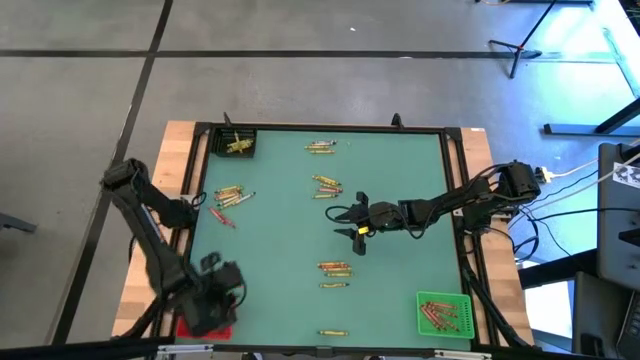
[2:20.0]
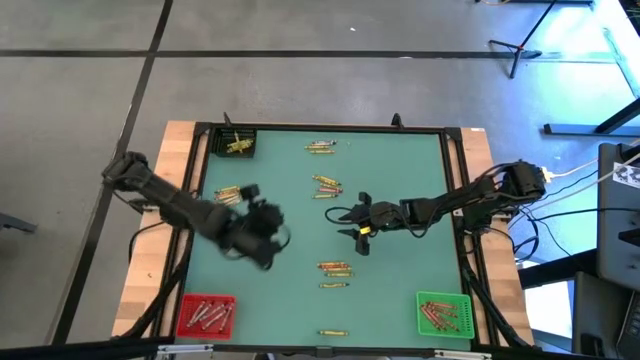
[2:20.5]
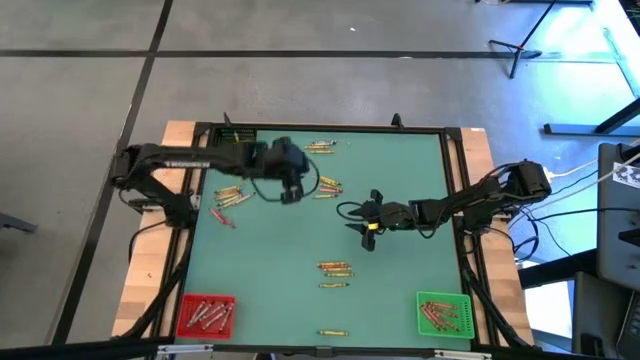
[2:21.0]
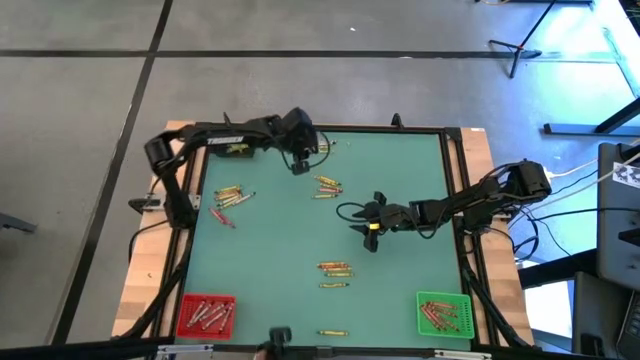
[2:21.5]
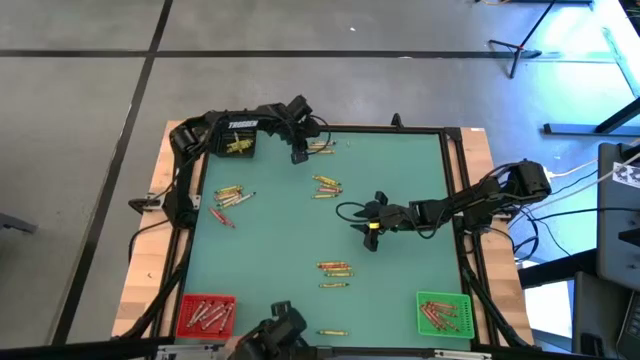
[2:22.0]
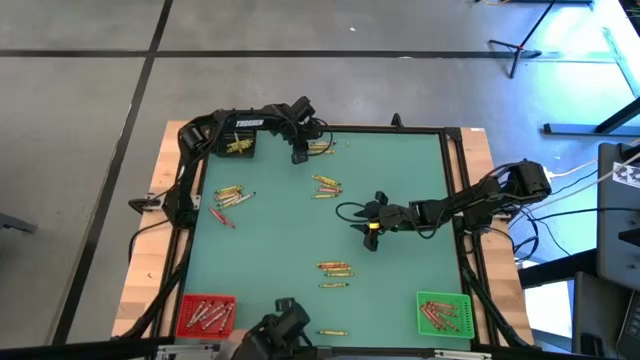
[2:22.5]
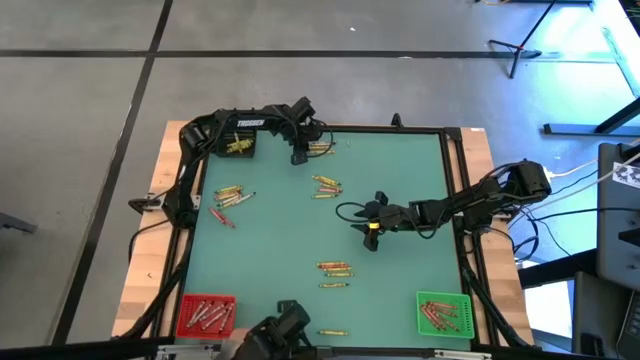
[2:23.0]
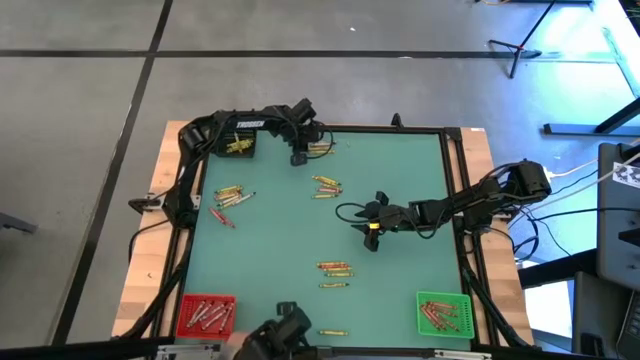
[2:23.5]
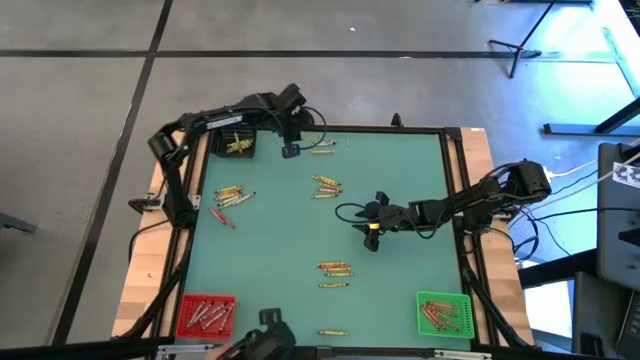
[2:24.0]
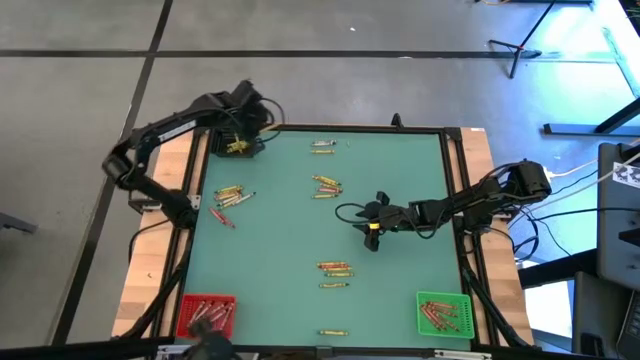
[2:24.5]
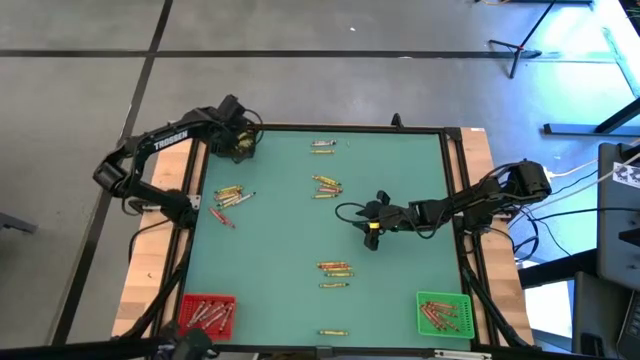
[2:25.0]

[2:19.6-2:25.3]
Task: Sort crayons
Put the yellow crayon into the black bin

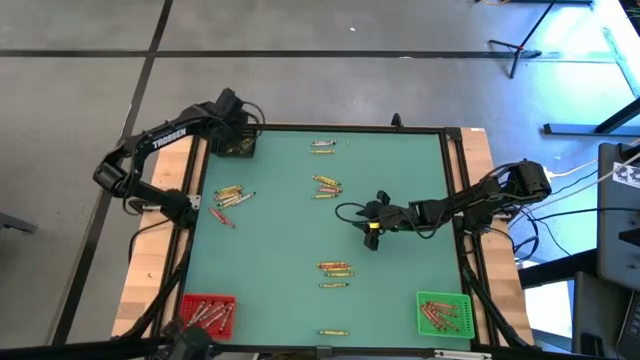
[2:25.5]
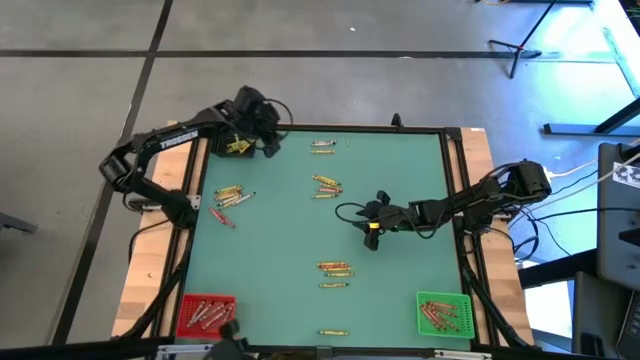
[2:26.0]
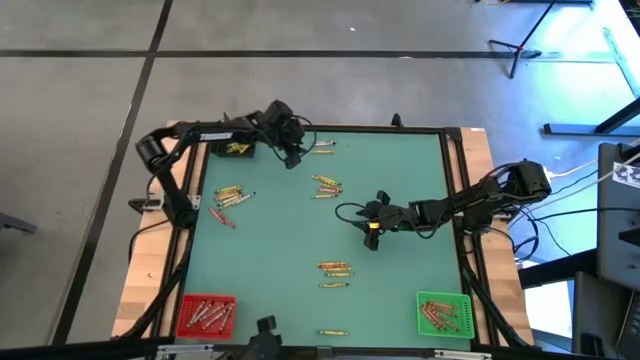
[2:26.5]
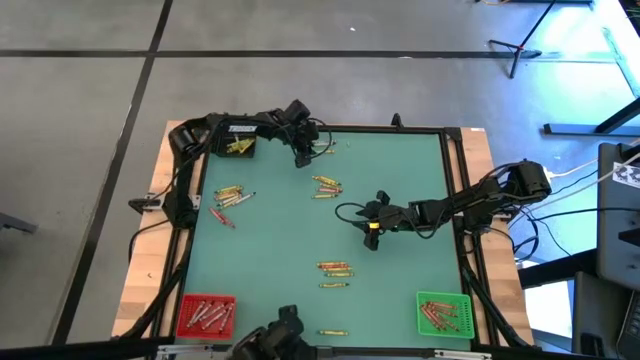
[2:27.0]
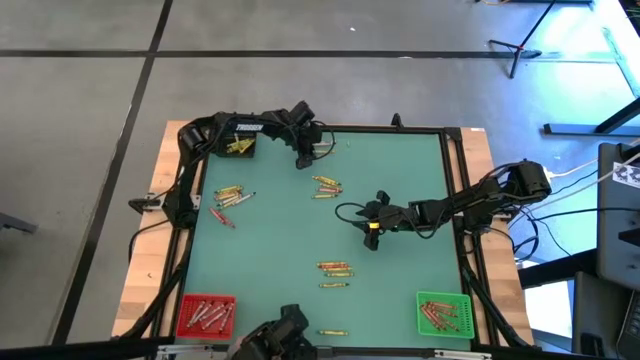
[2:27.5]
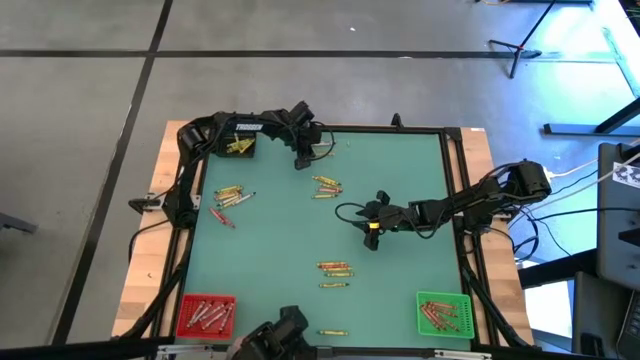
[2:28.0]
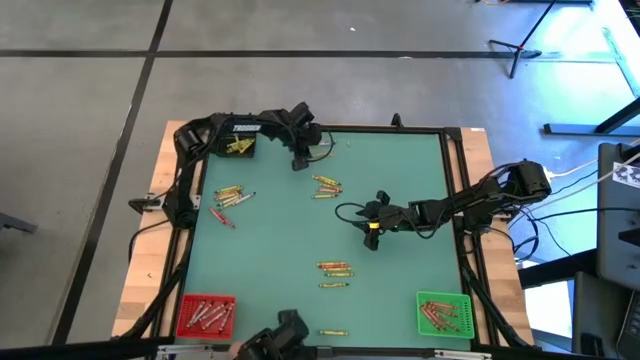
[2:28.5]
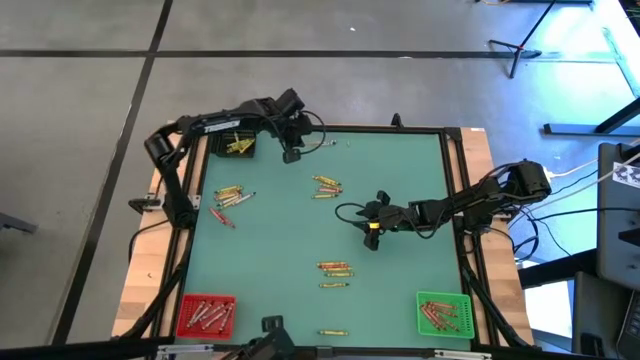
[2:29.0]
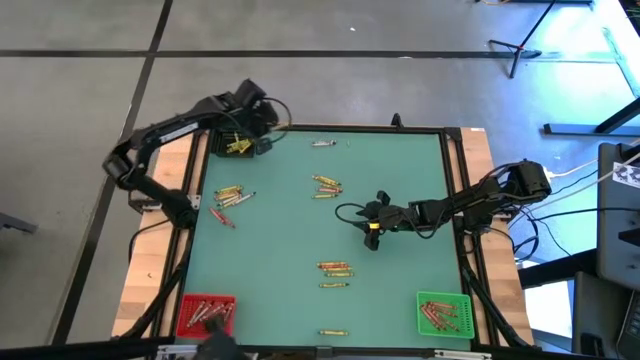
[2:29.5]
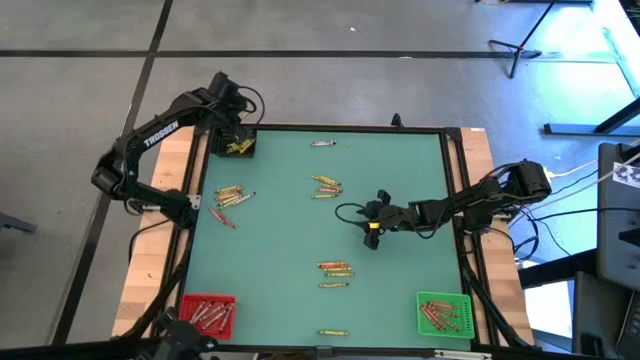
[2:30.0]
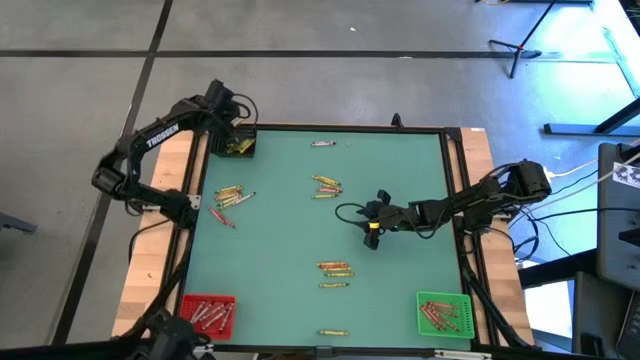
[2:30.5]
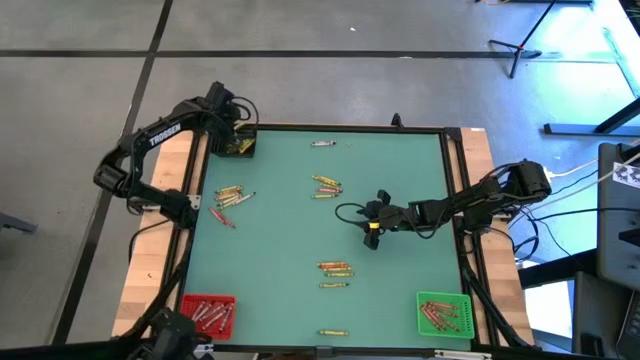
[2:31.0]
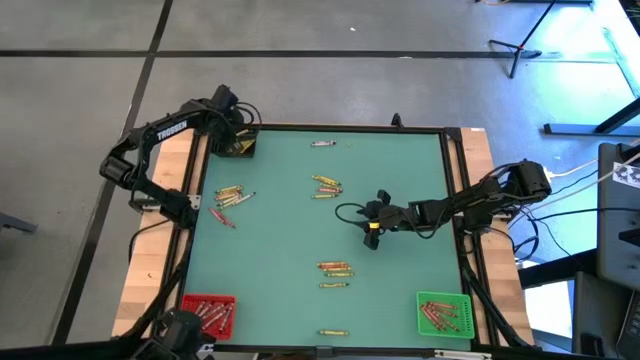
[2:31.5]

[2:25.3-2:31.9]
Put the yellow crayon into the black bin

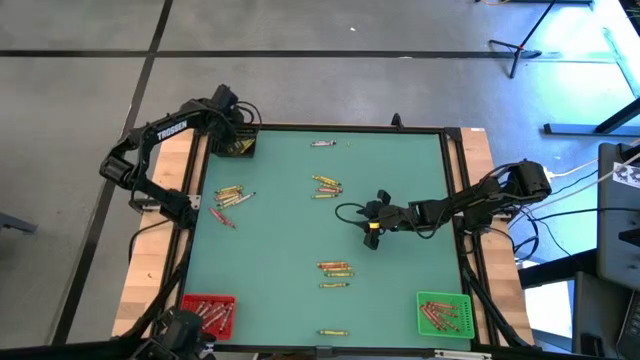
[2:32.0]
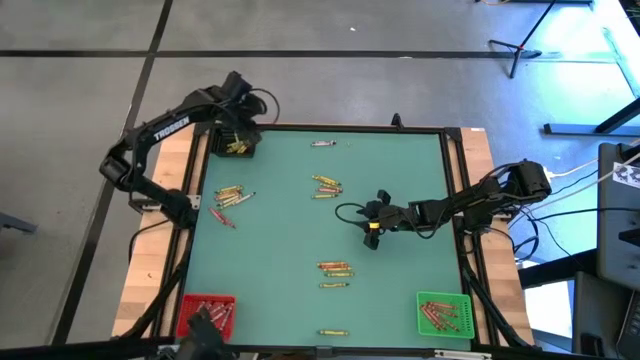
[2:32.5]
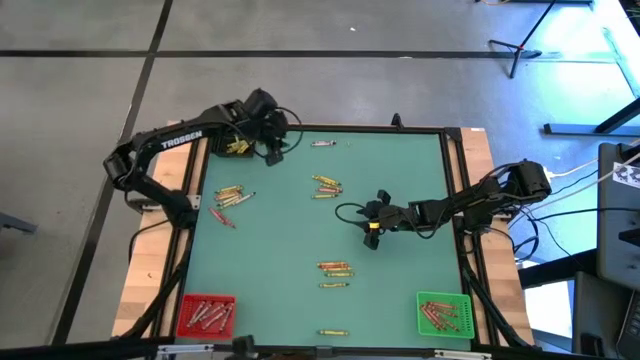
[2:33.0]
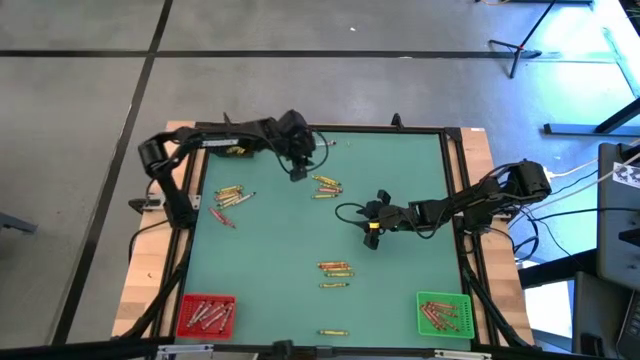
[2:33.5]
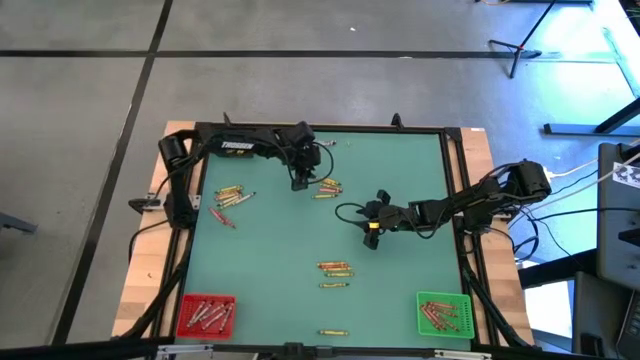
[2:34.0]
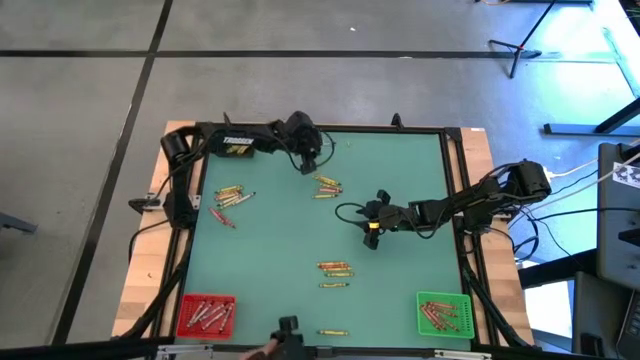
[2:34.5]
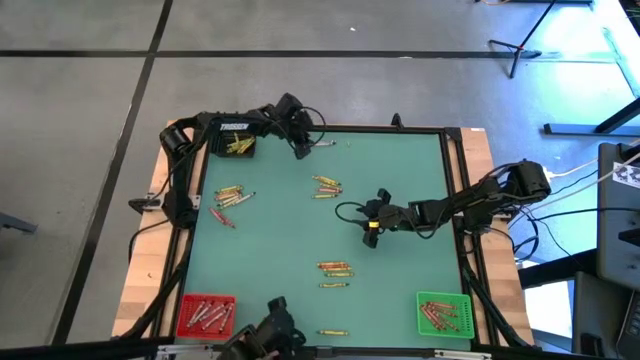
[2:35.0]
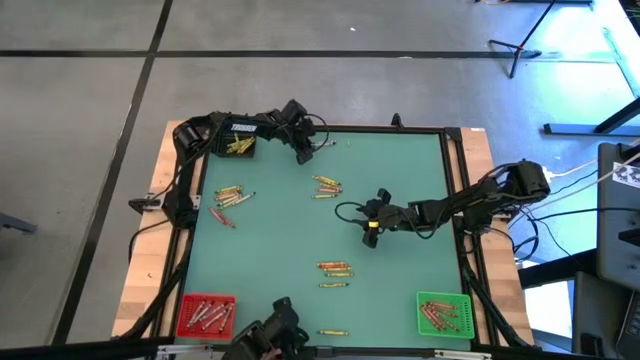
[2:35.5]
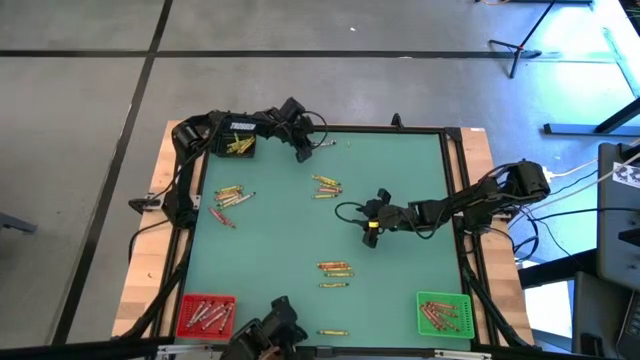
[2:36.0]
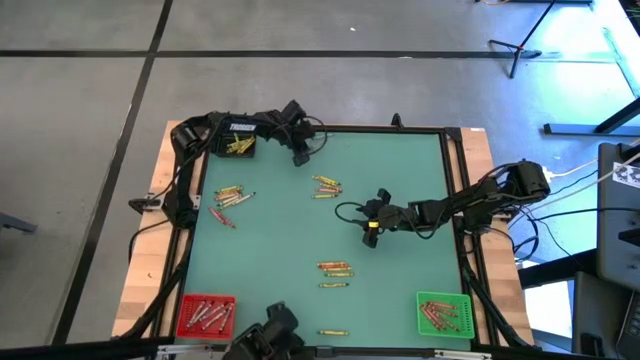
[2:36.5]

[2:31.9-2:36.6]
Put the black crayon into the red bin

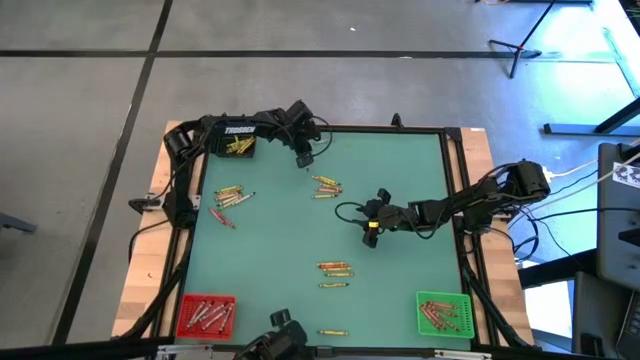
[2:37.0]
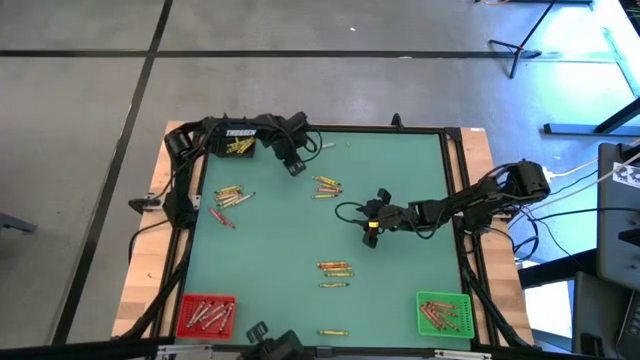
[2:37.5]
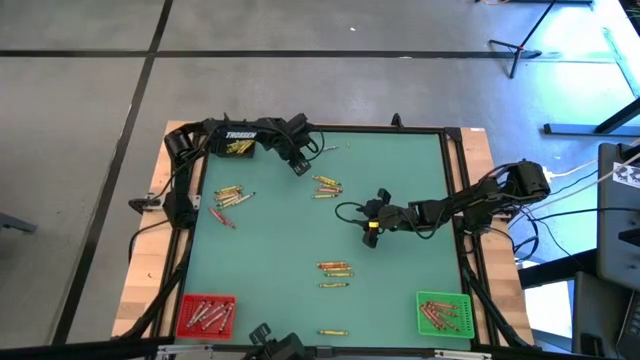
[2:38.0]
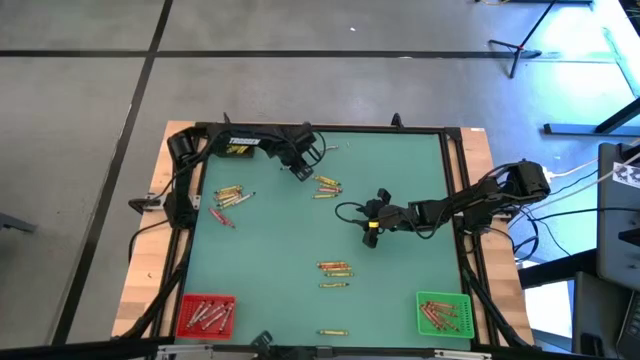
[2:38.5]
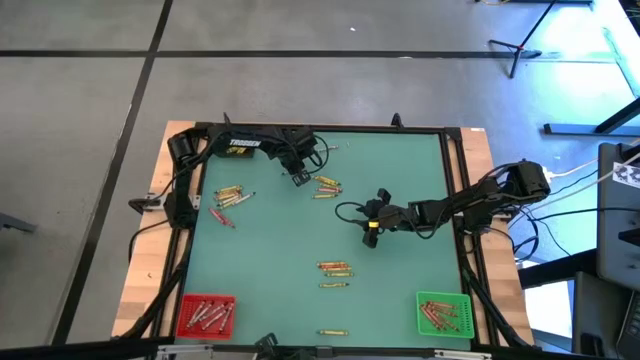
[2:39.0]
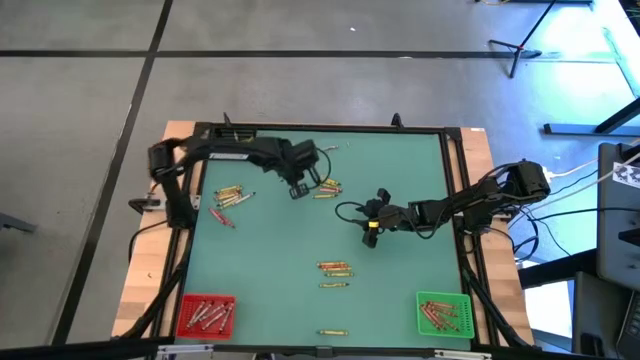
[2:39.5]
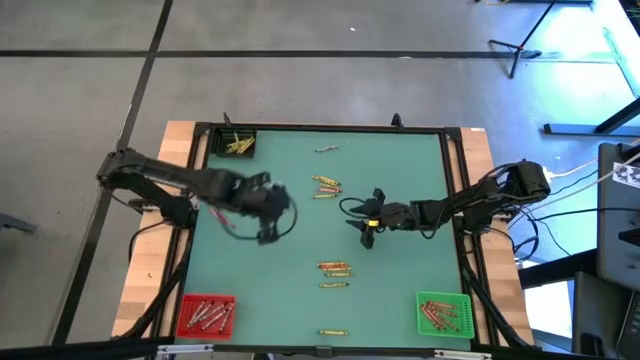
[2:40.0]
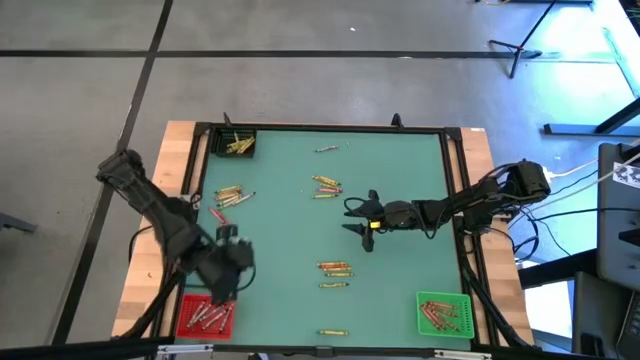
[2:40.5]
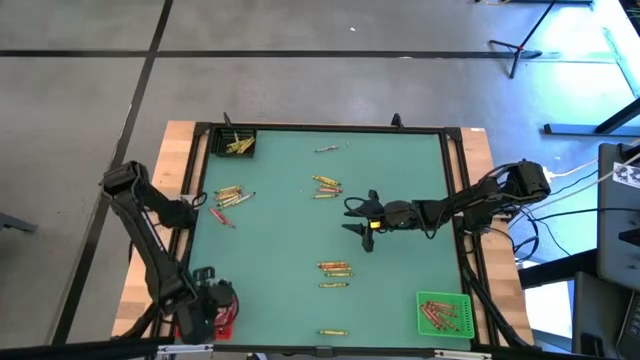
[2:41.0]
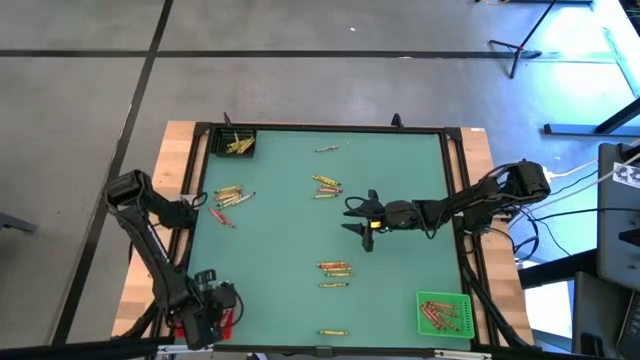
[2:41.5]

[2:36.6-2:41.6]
Put the black crayon into the red bin
